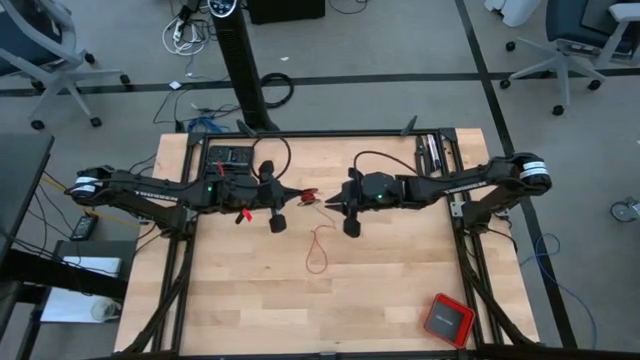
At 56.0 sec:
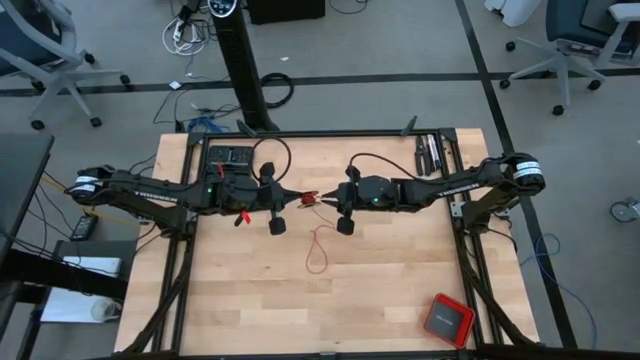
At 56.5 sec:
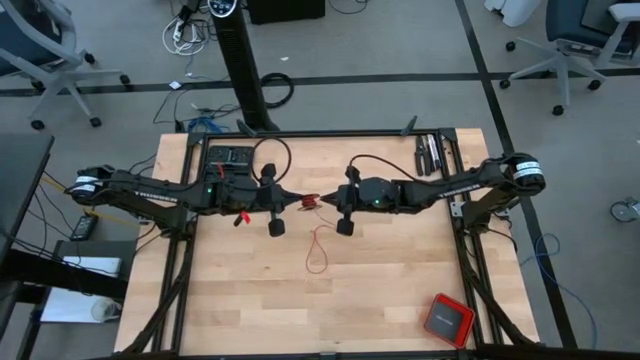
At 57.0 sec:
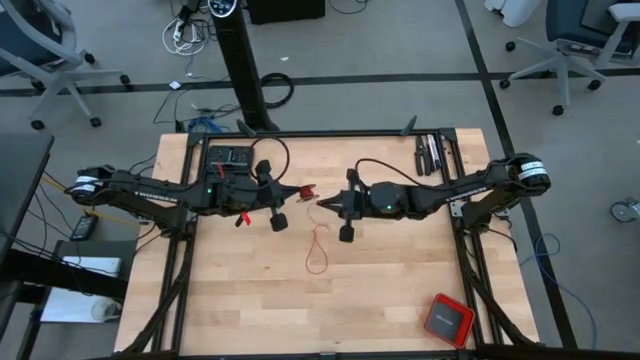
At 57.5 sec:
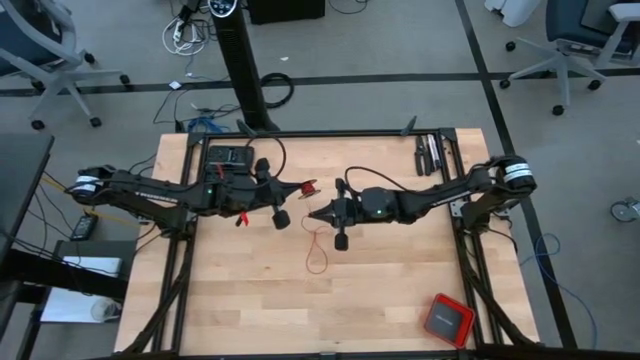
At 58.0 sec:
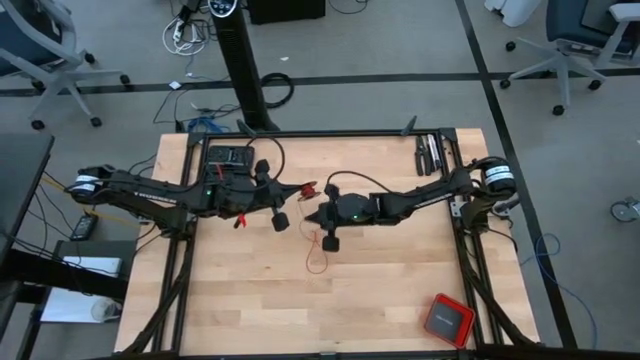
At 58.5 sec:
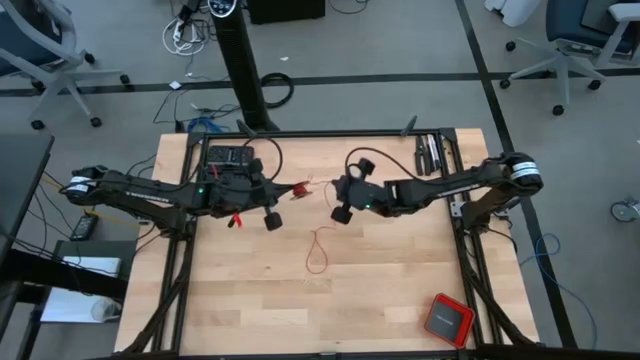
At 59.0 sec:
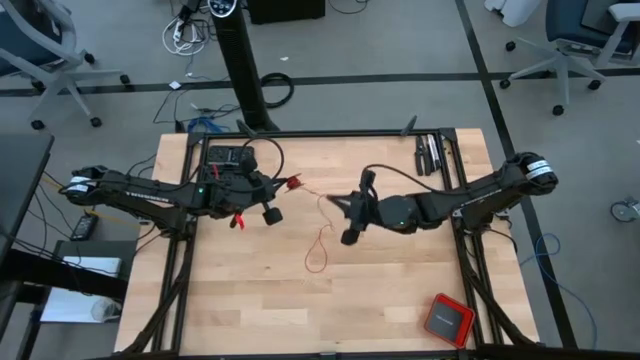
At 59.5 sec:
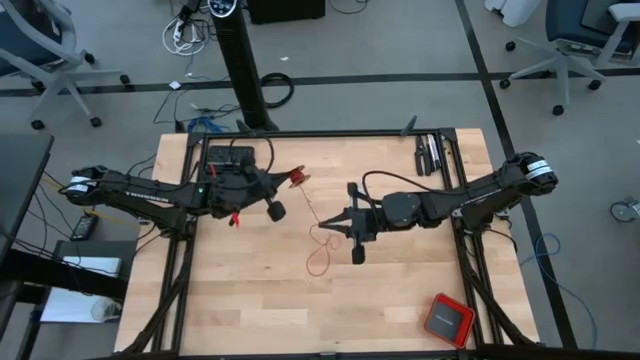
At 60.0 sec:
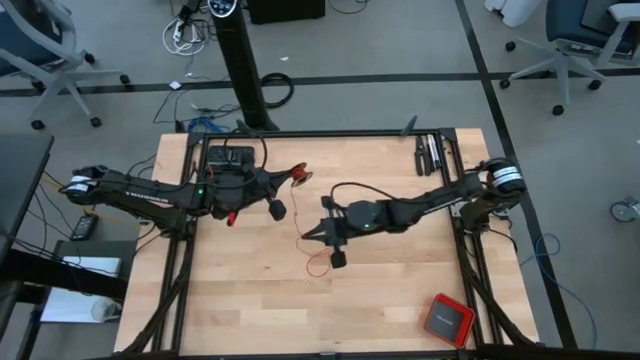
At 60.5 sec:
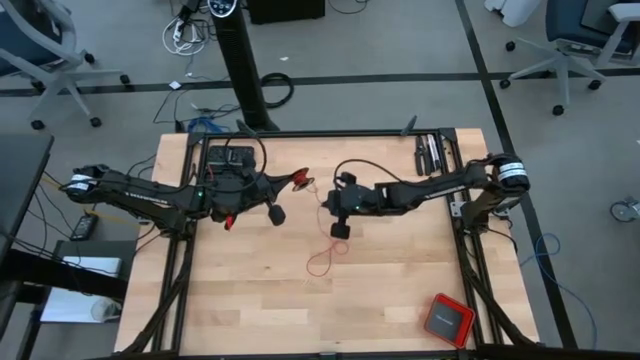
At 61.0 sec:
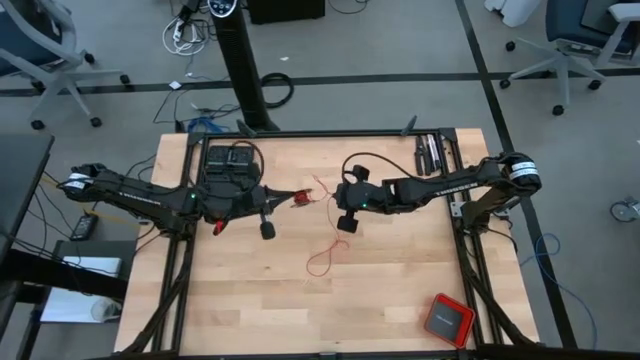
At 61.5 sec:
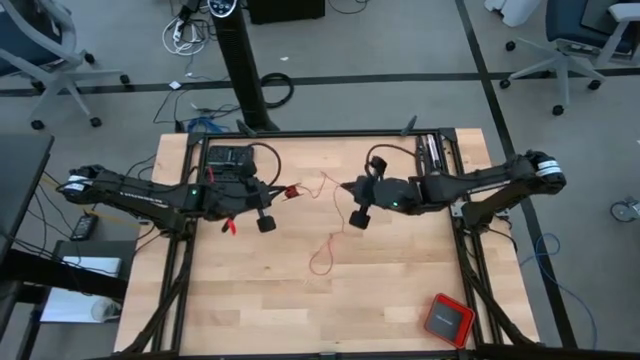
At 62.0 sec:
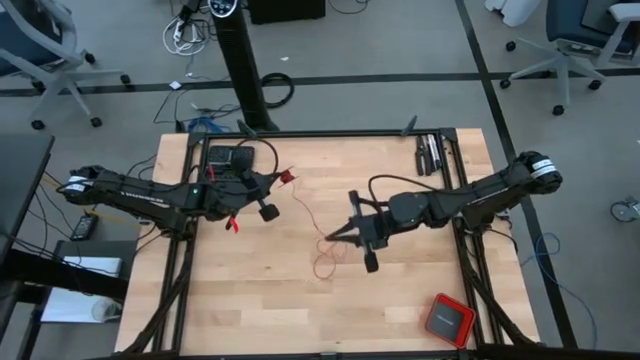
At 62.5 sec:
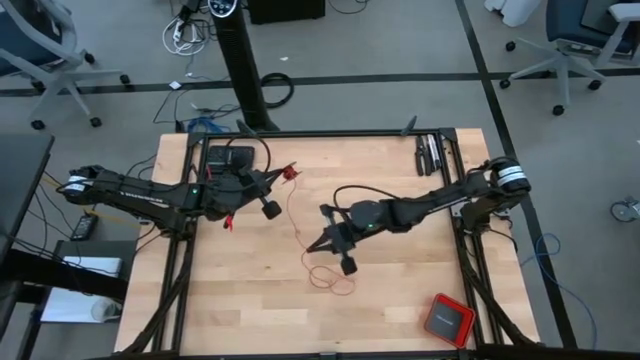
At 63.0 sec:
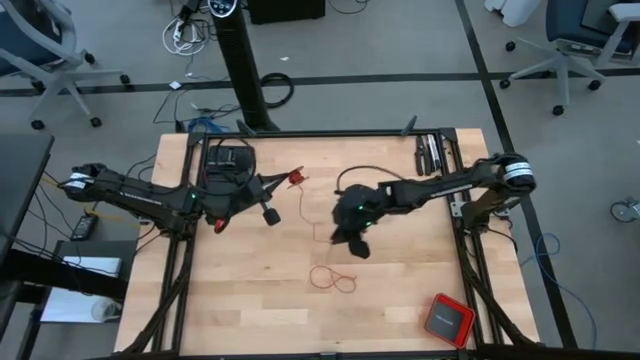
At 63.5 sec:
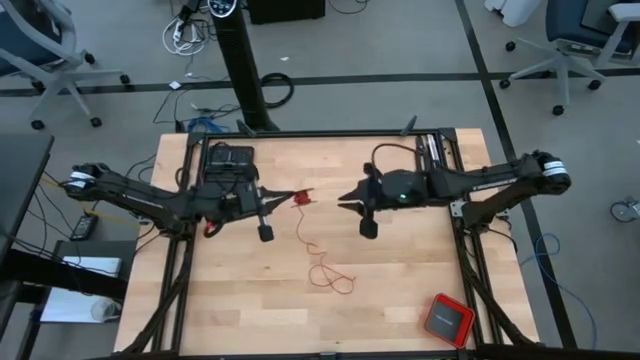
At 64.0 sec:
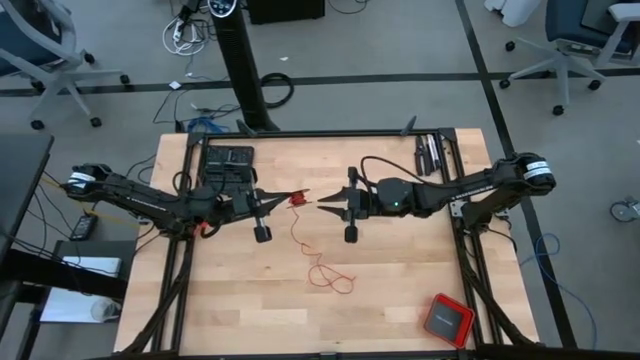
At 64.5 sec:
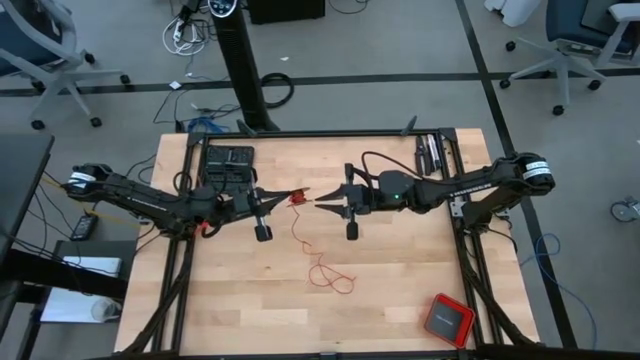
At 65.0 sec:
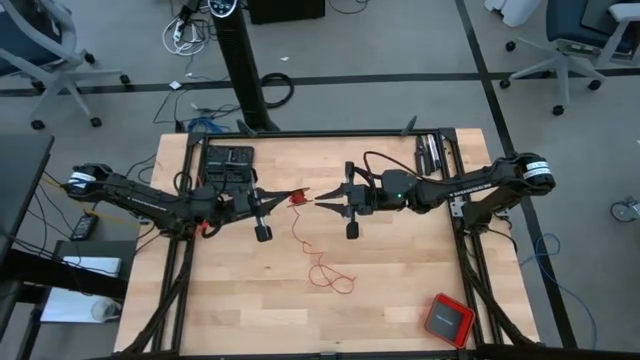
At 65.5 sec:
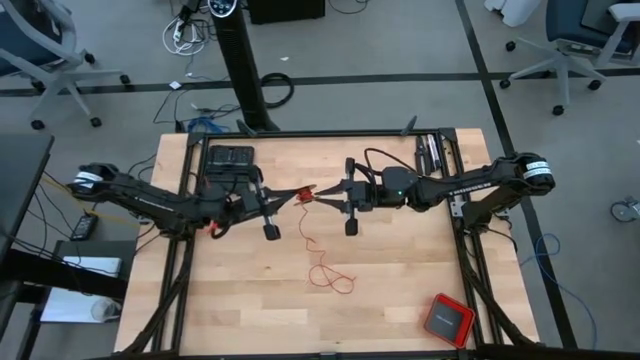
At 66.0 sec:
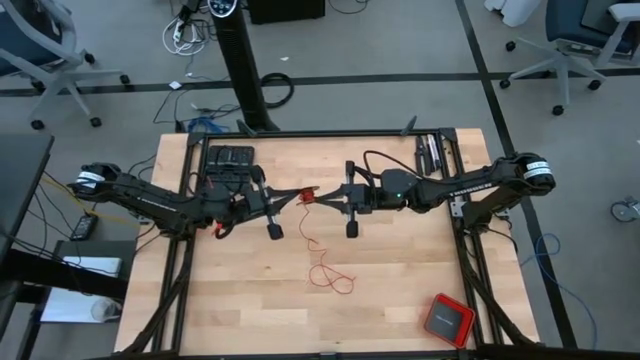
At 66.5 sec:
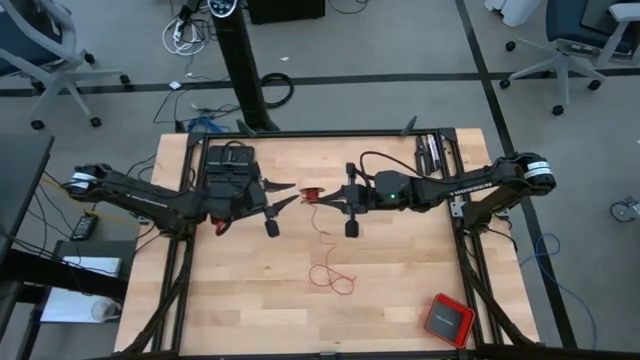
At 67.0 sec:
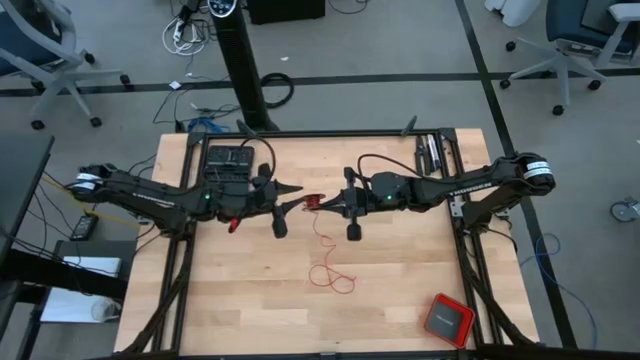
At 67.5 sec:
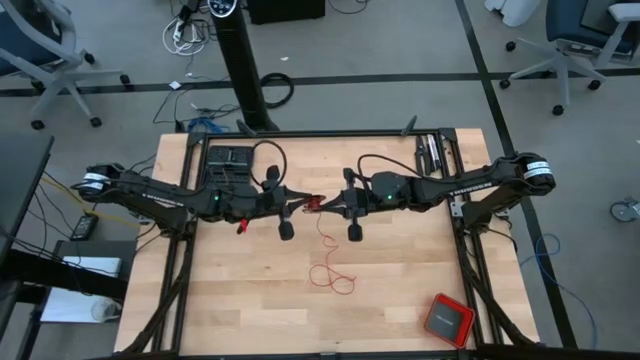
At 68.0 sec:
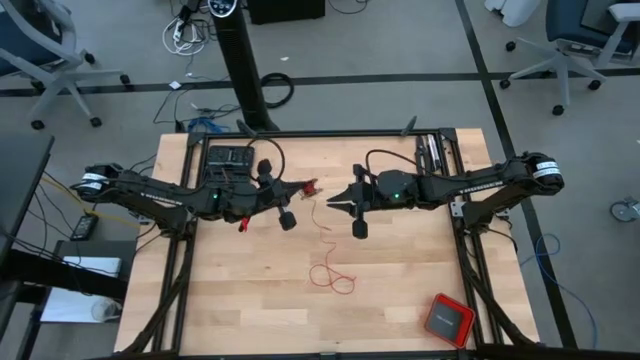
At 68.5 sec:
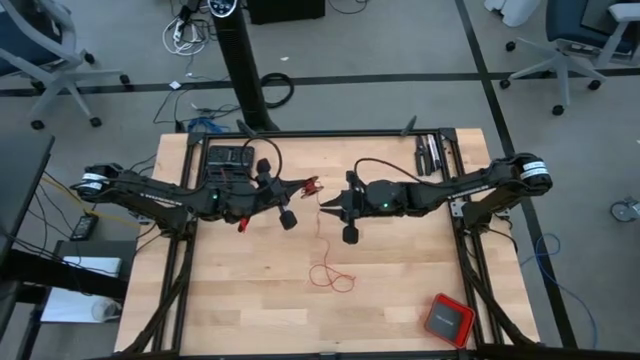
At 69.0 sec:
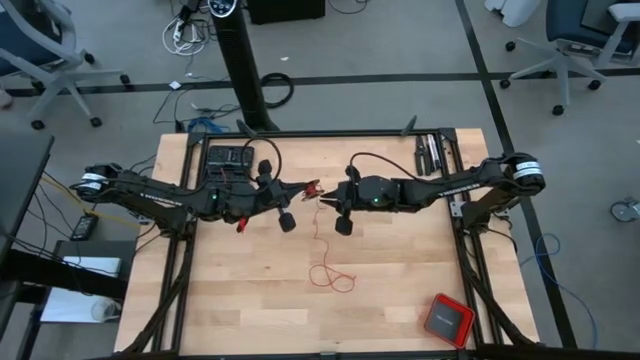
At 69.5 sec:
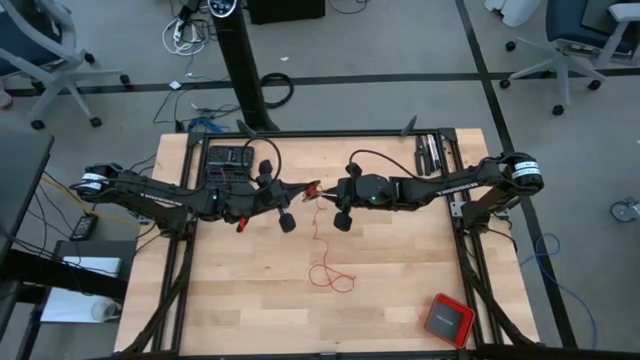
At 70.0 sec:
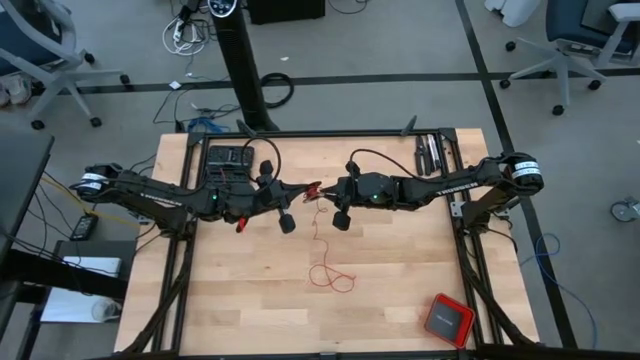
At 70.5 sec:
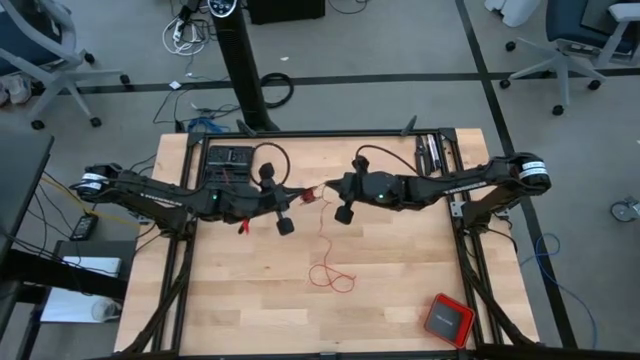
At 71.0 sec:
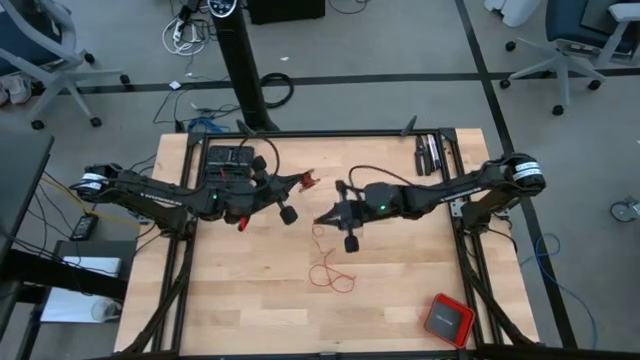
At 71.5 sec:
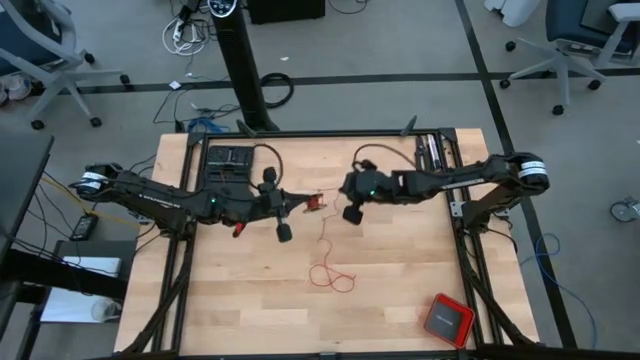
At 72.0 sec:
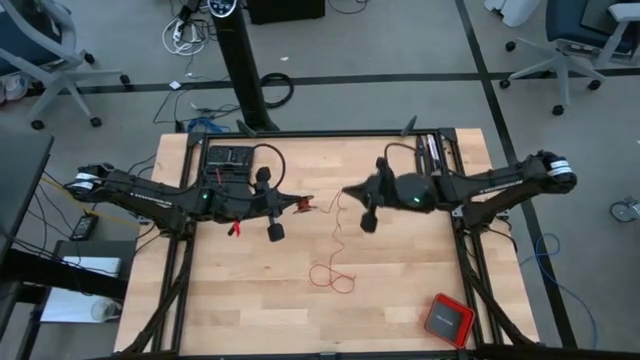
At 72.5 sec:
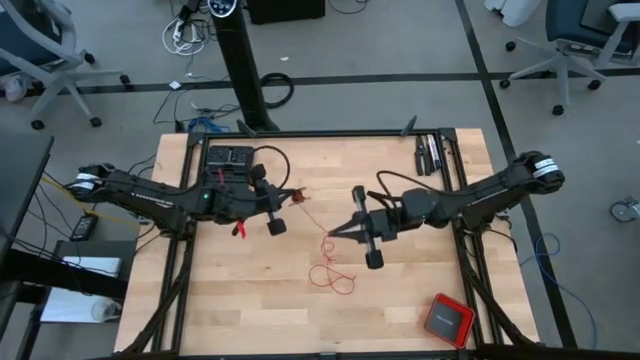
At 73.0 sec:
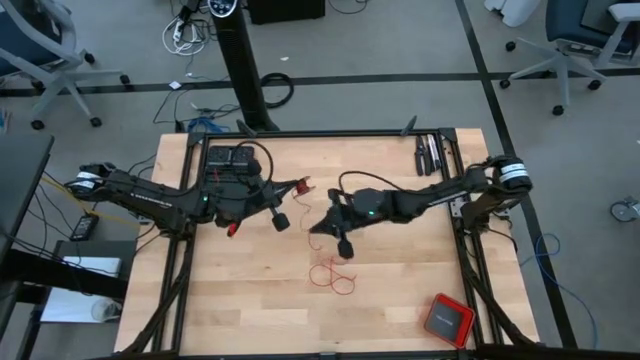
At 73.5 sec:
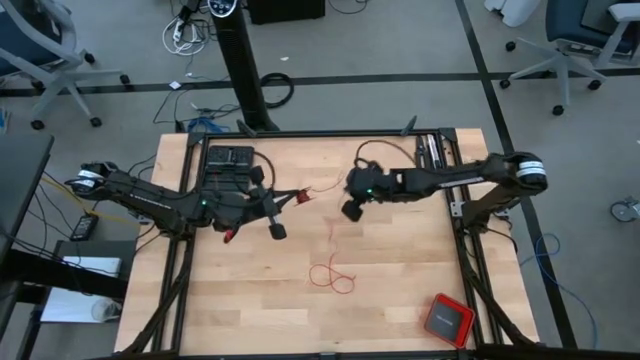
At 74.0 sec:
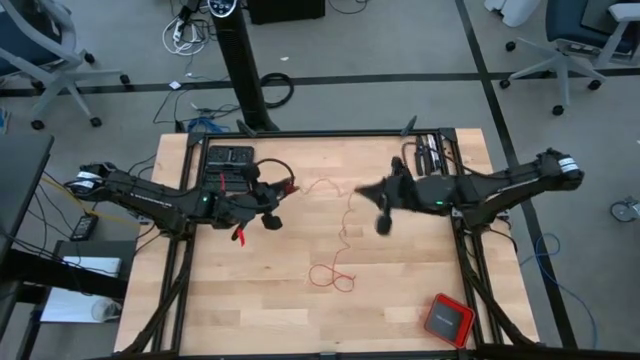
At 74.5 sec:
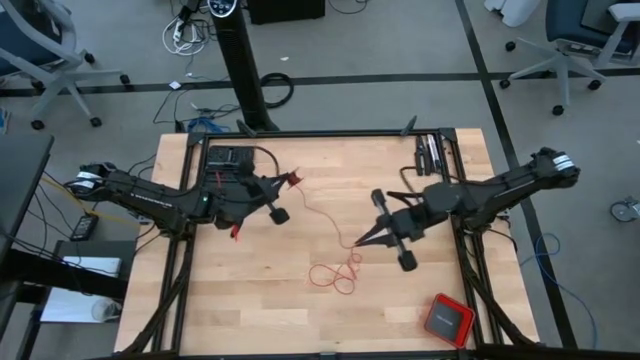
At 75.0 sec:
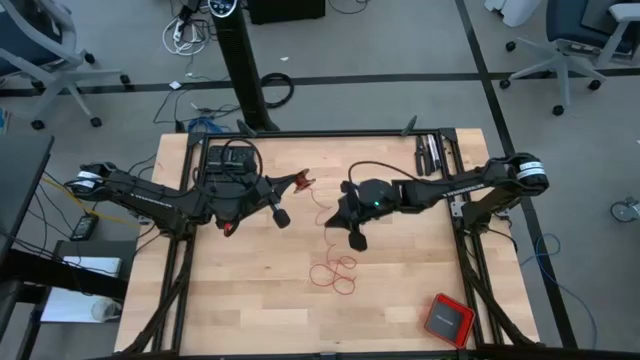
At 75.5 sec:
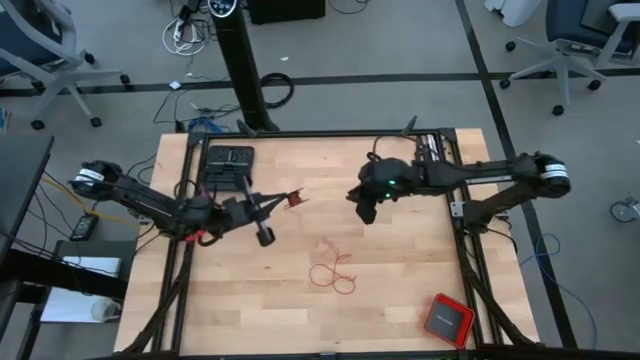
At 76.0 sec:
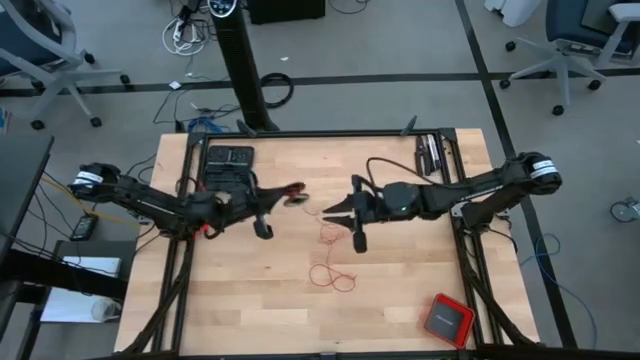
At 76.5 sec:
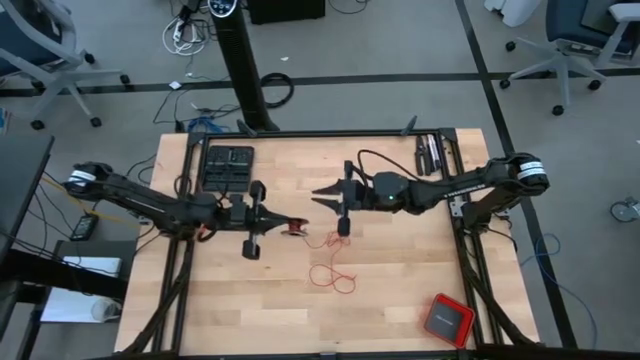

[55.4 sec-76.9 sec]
Task: Coil cords
Uncoil the red wire from the spool
